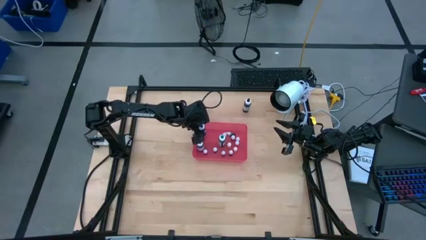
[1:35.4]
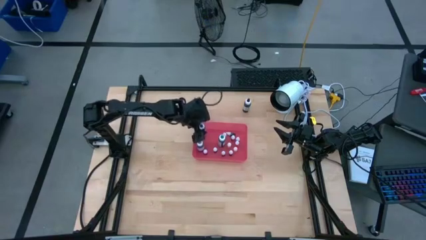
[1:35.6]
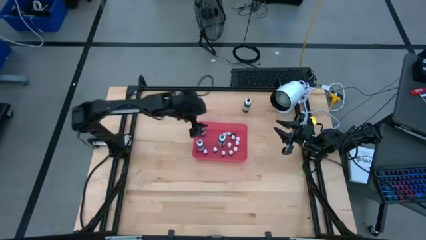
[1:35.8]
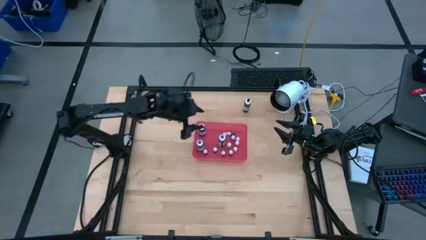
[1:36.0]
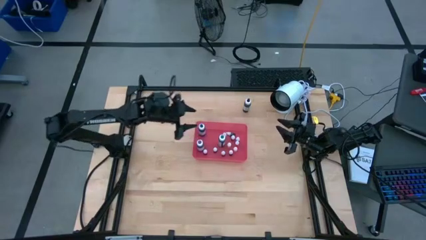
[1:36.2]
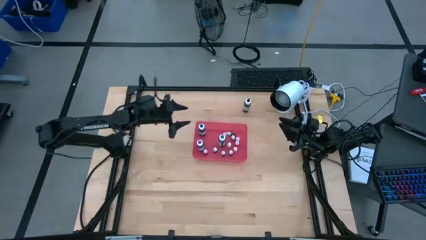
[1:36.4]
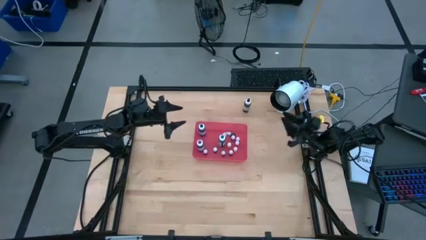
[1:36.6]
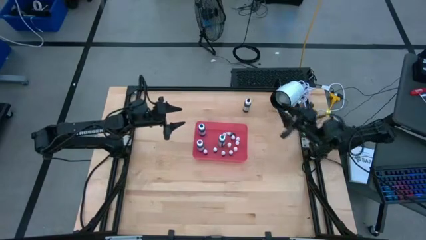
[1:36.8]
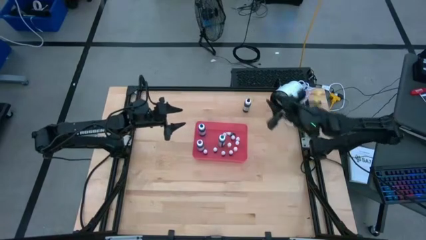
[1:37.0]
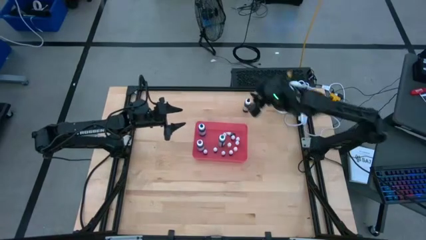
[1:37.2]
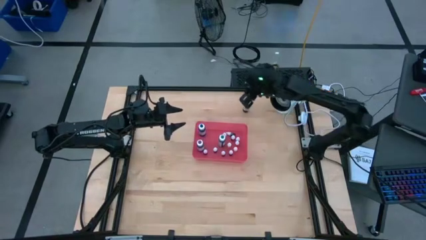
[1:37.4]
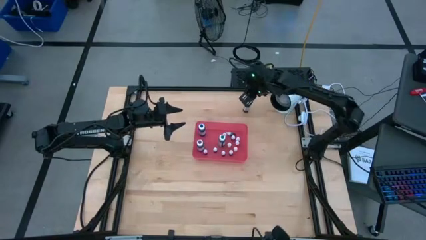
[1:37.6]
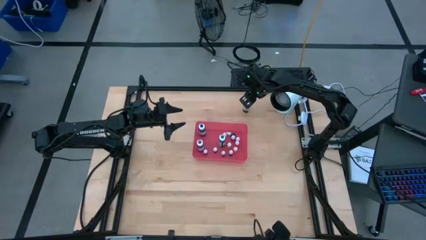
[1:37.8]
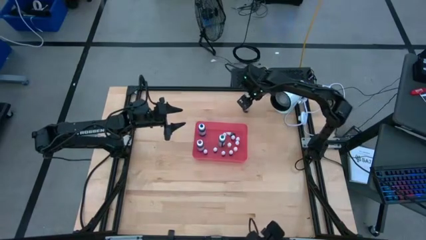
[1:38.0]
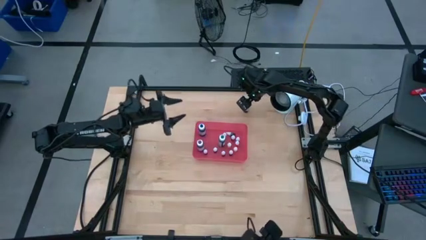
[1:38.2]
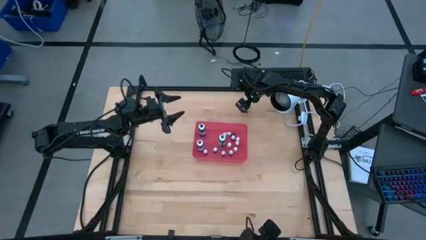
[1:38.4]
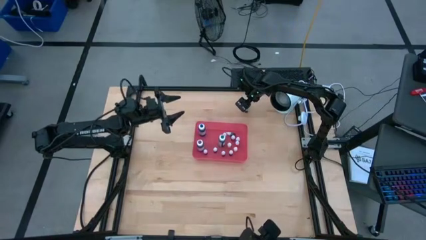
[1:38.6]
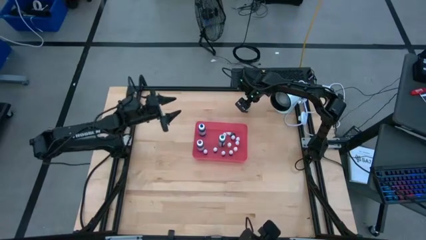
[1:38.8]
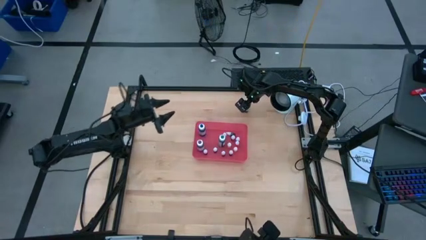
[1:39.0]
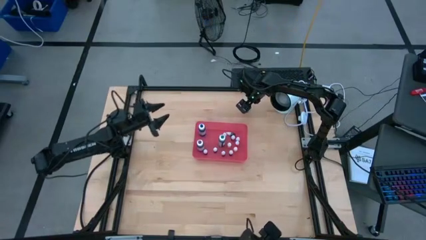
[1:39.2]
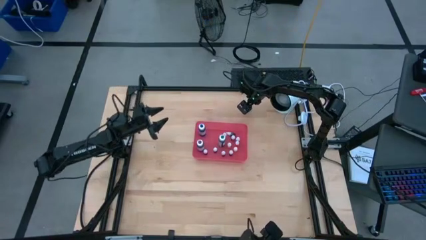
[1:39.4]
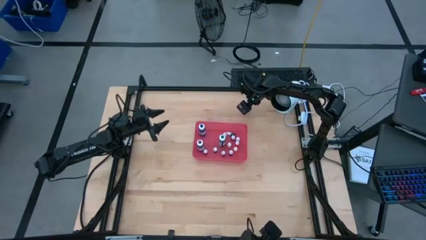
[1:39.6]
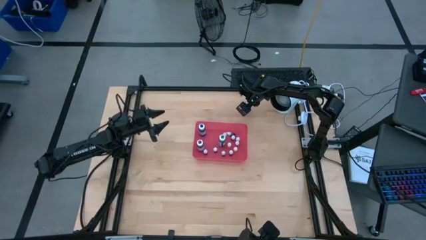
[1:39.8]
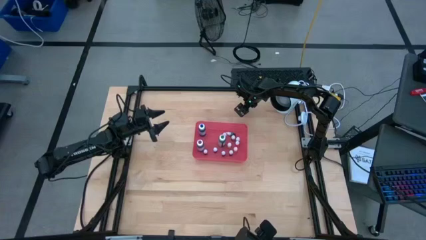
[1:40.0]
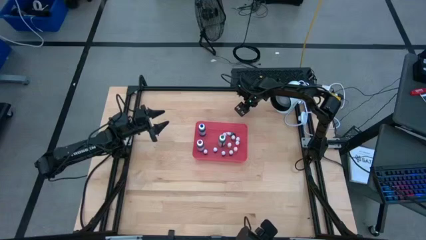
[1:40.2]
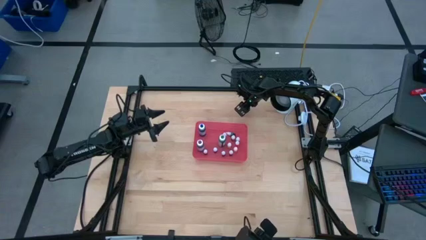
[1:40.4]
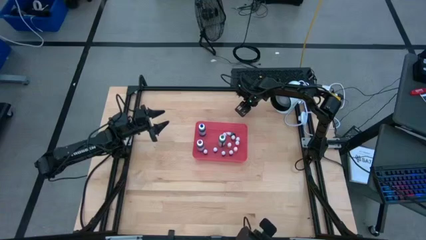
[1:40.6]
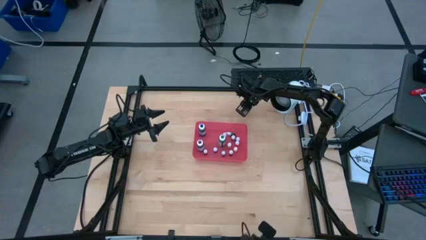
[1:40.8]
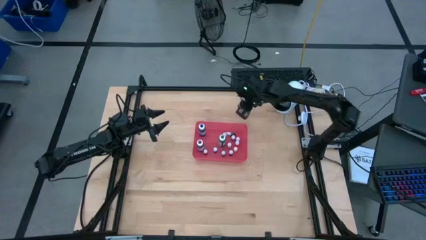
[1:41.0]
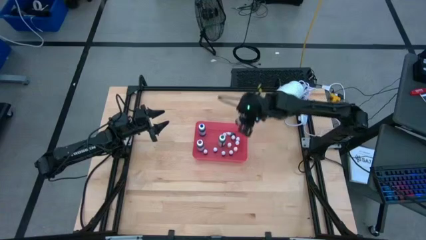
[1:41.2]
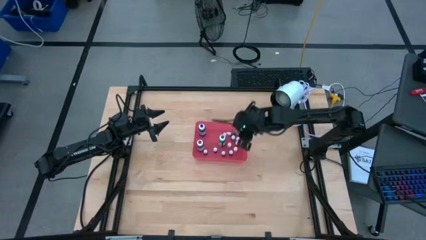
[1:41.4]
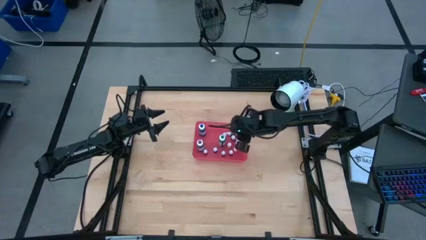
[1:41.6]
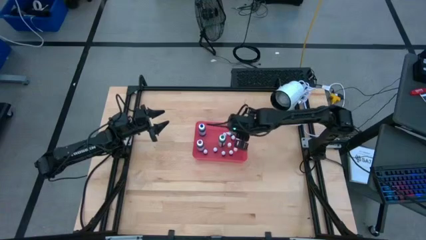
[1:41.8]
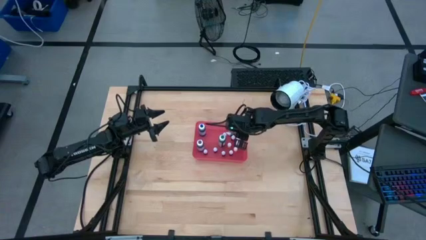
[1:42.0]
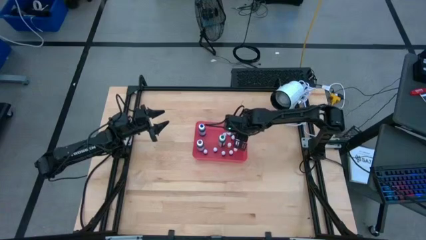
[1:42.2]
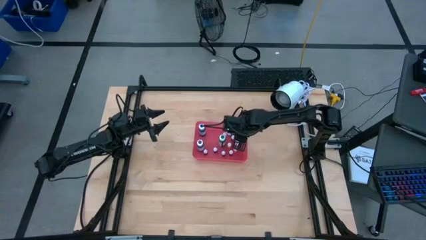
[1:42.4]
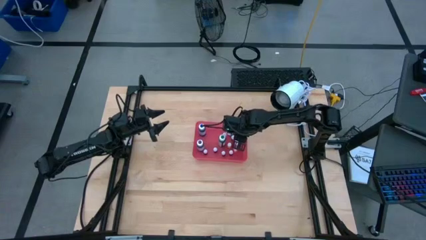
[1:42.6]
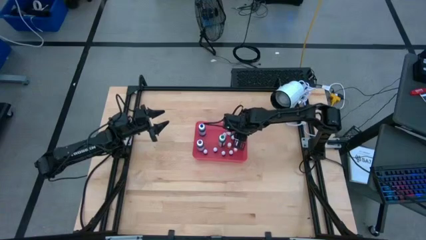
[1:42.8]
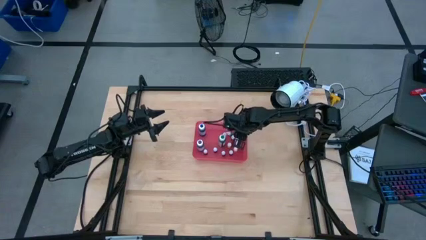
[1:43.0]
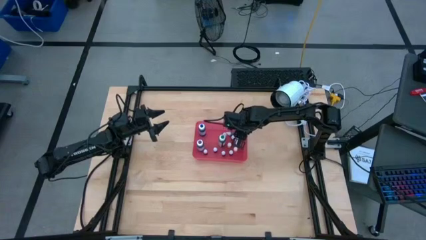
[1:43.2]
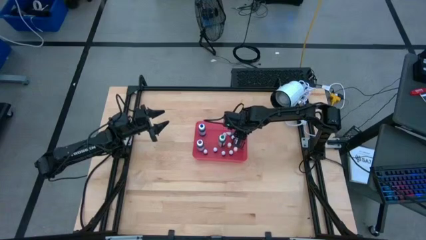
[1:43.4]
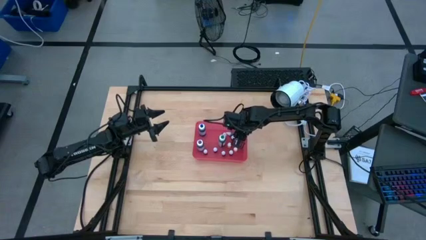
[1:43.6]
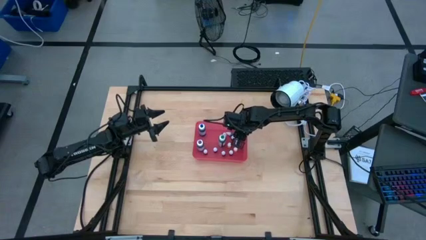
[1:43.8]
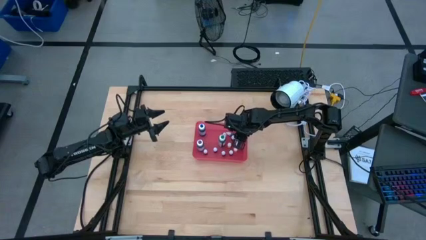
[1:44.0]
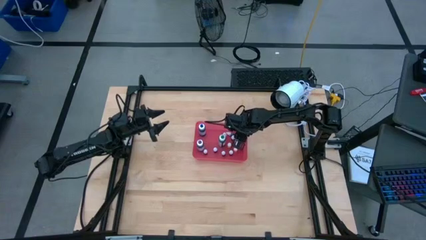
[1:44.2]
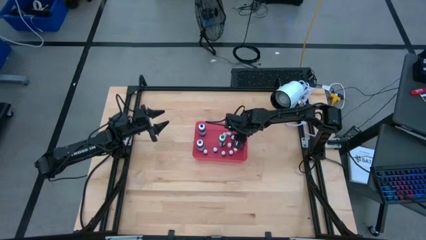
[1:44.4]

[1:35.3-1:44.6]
Task: Pick & Place food coloring
Put the large black food coloring bottle into the red bin

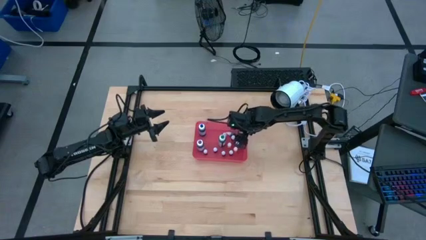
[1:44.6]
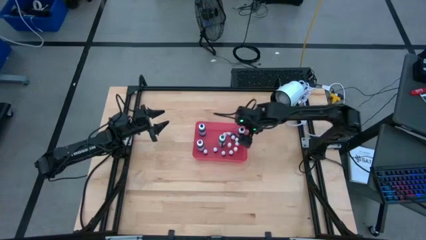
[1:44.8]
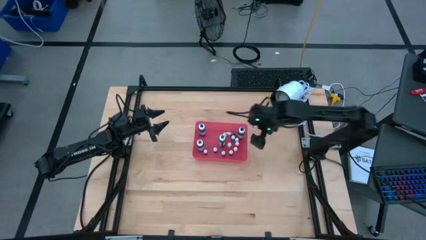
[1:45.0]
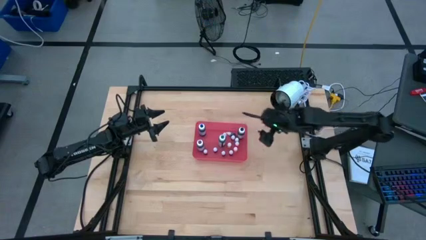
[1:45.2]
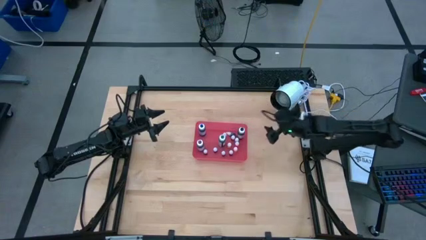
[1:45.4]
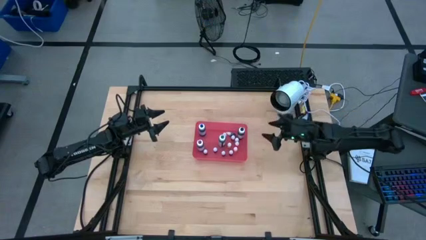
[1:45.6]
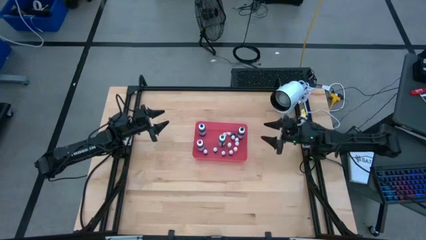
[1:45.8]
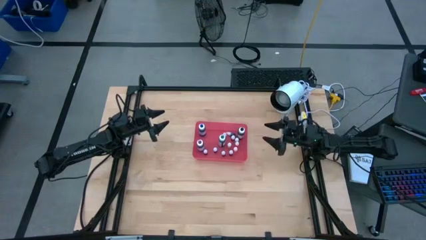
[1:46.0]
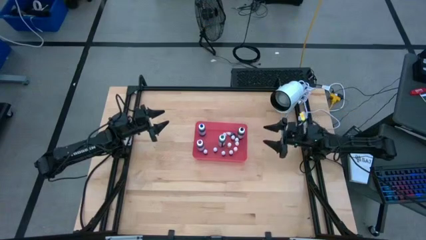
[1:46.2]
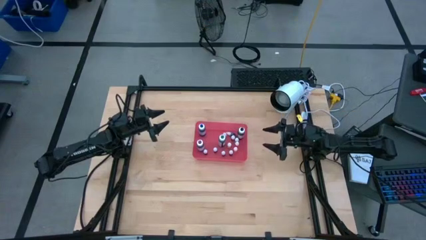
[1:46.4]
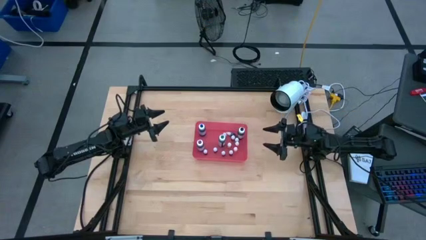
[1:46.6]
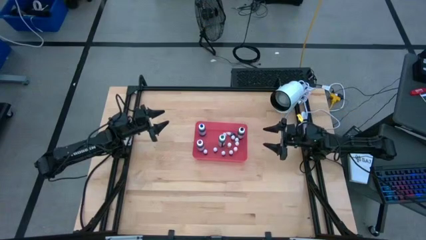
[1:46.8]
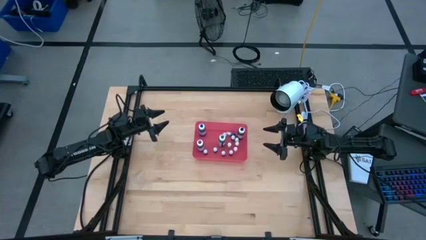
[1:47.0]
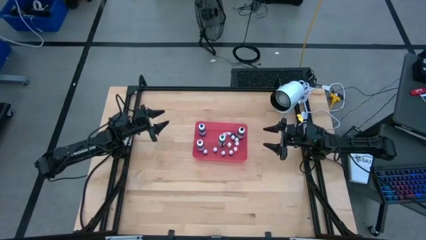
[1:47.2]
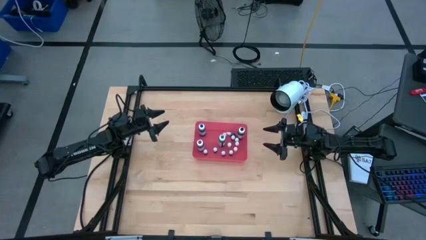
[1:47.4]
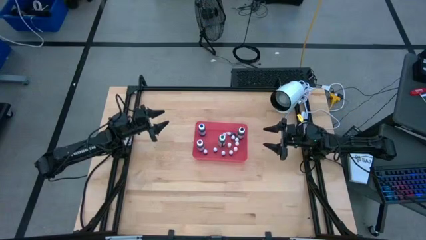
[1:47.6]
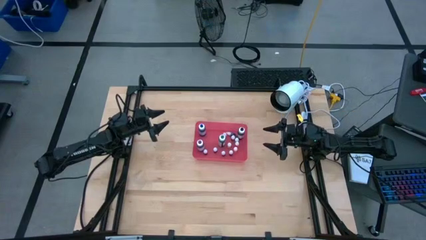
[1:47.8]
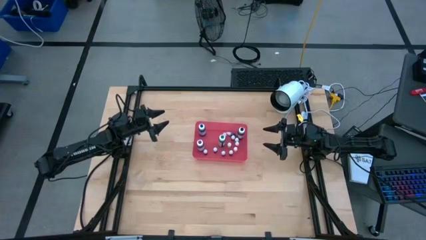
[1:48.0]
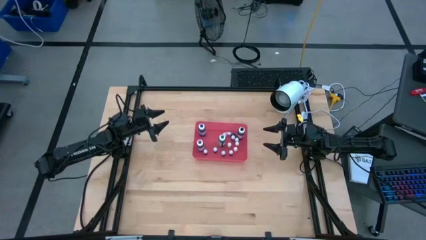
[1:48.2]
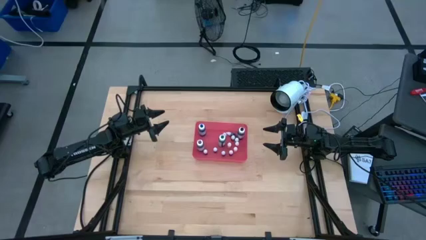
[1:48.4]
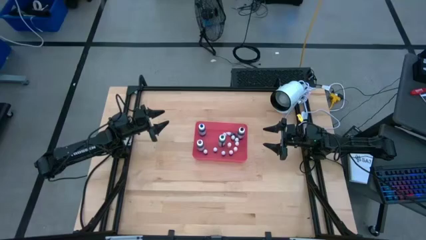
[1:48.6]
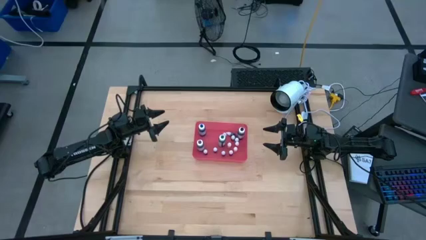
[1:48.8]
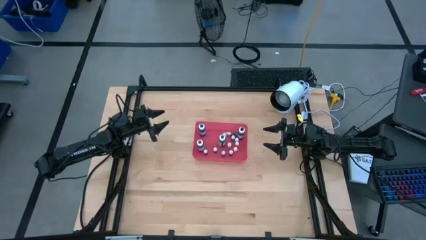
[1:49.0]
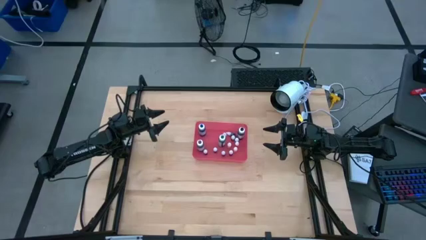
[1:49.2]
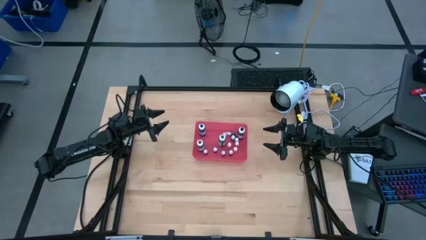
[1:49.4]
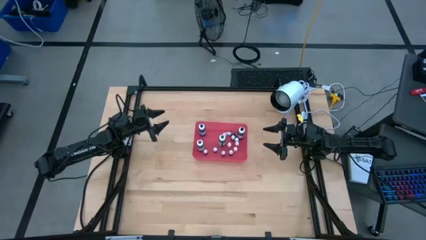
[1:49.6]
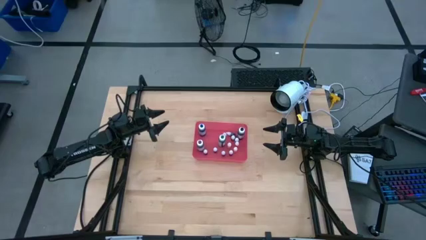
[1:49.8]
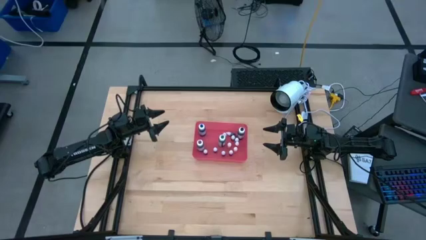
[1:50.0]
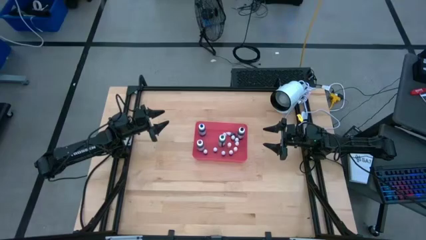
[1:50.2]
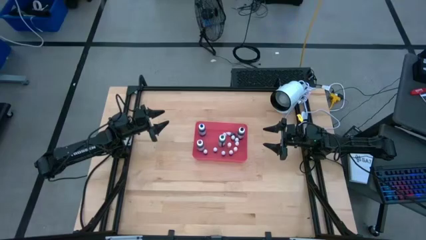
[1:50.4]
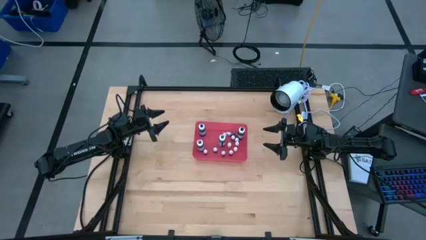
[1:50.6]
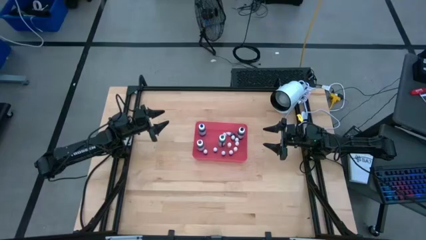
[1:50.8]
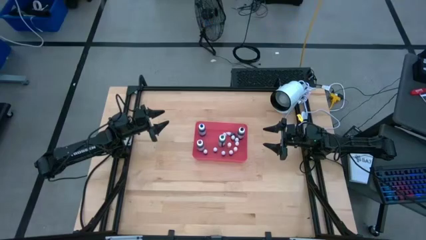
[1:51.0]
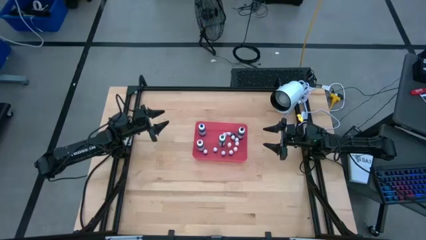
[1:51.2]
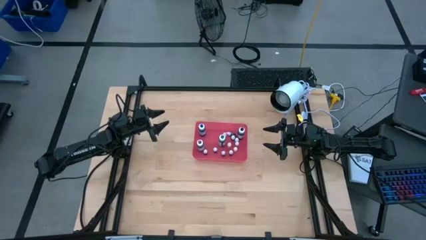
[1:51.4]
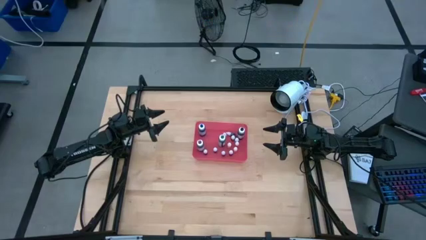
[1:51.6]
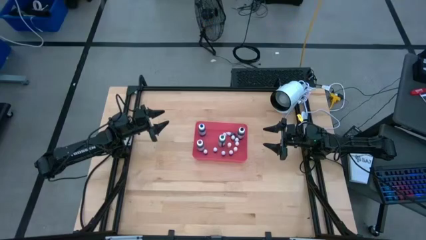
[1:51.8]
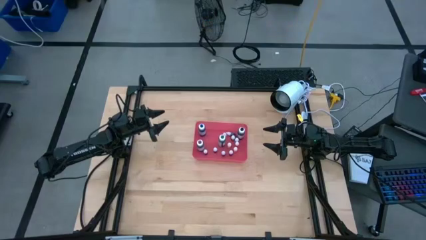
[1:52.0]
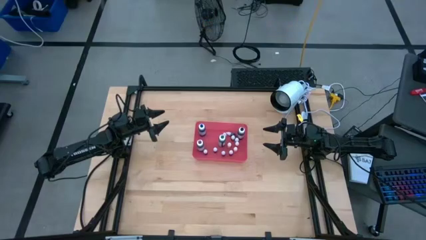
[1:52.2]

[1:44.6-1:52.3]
Return to Home Position
